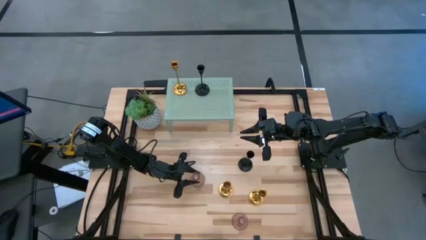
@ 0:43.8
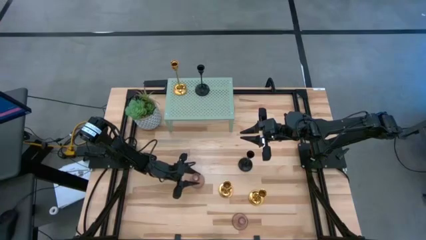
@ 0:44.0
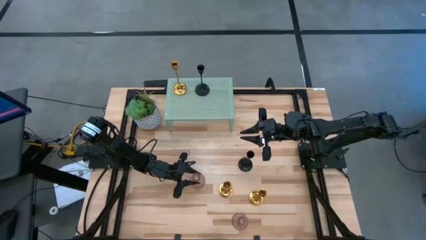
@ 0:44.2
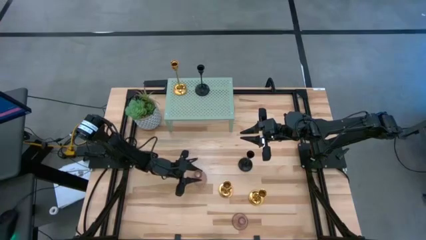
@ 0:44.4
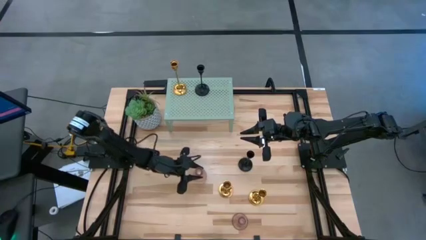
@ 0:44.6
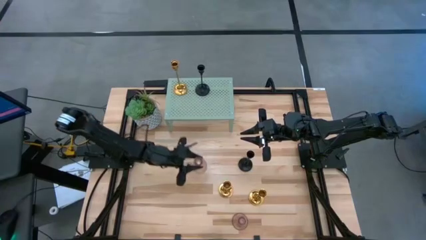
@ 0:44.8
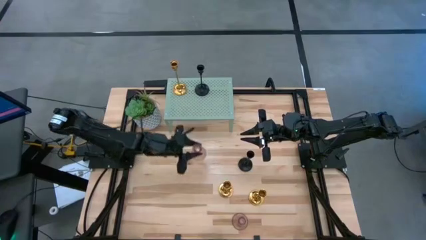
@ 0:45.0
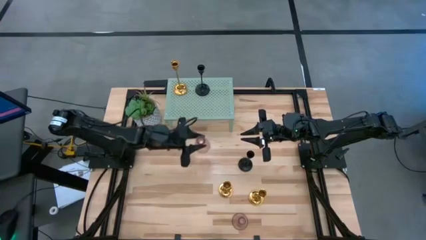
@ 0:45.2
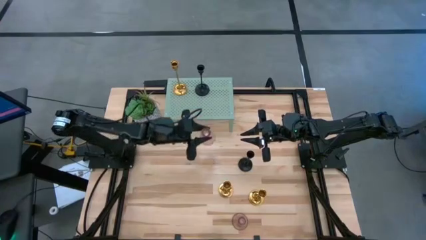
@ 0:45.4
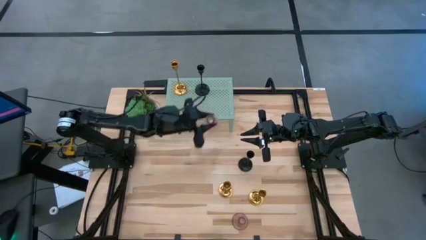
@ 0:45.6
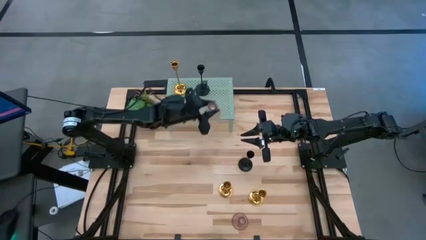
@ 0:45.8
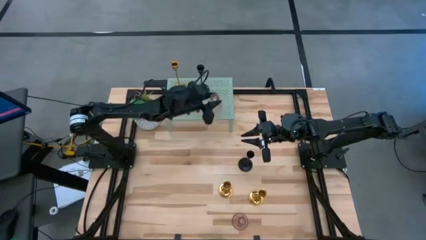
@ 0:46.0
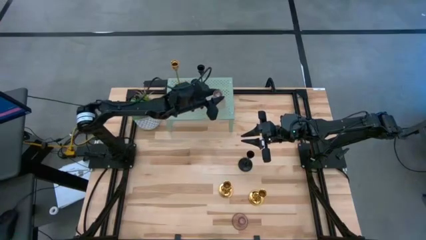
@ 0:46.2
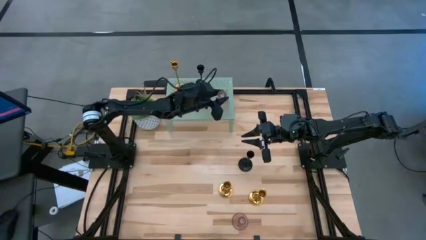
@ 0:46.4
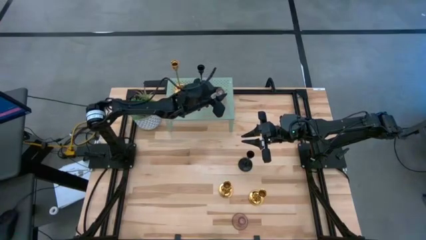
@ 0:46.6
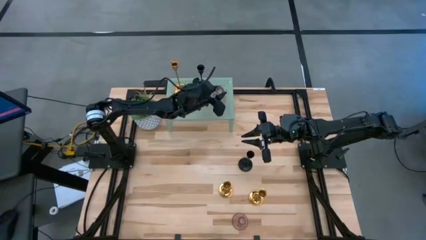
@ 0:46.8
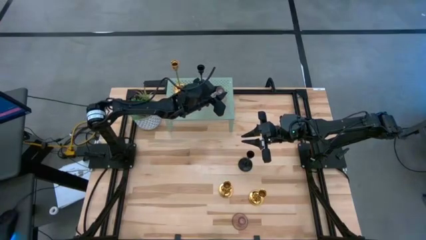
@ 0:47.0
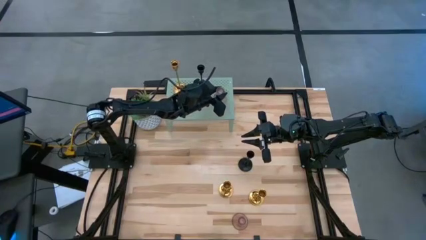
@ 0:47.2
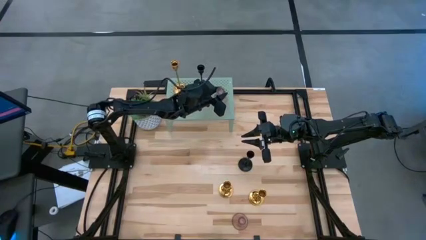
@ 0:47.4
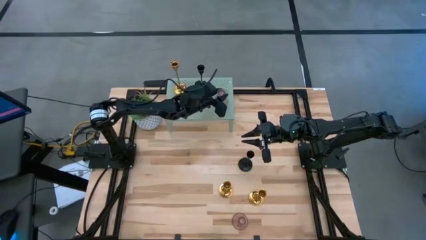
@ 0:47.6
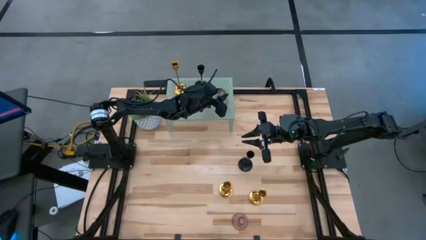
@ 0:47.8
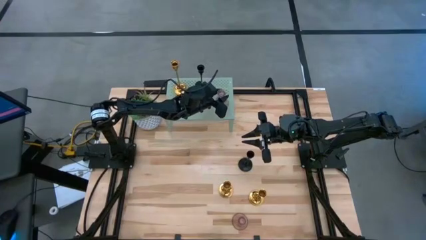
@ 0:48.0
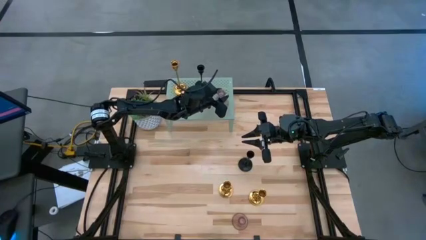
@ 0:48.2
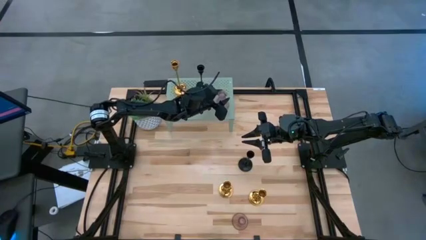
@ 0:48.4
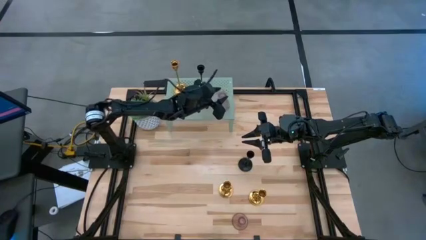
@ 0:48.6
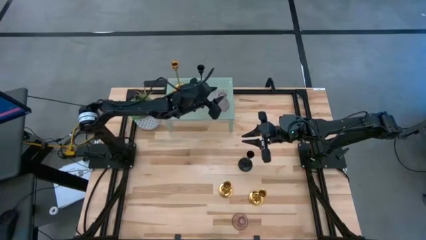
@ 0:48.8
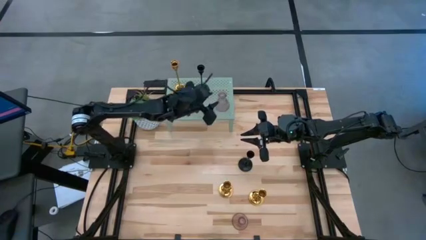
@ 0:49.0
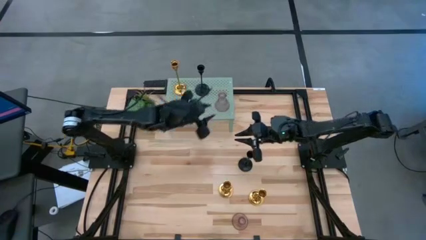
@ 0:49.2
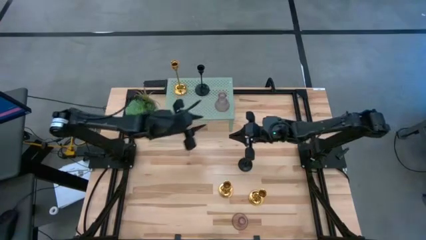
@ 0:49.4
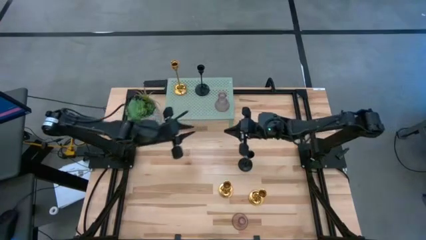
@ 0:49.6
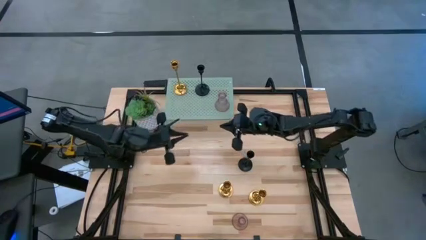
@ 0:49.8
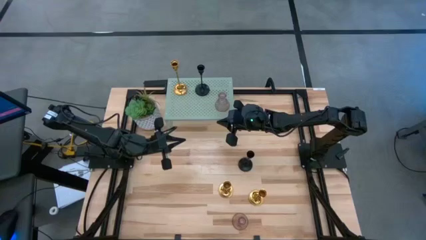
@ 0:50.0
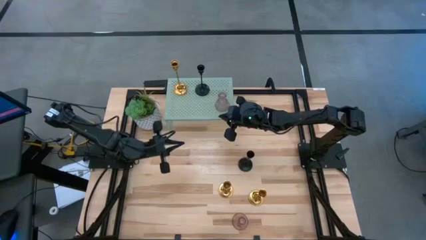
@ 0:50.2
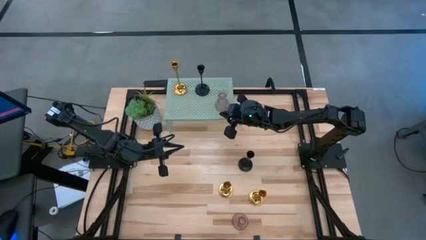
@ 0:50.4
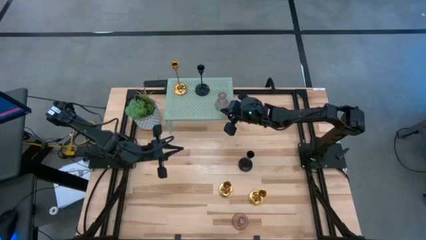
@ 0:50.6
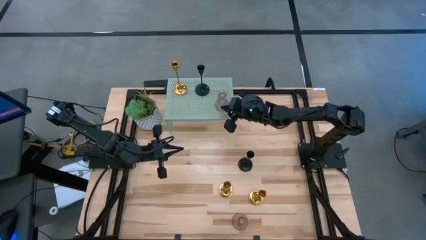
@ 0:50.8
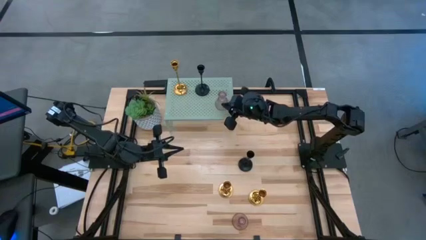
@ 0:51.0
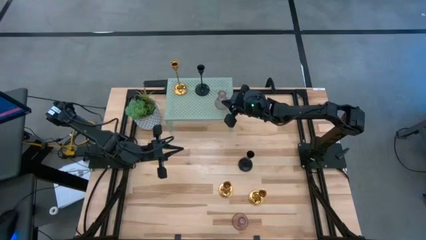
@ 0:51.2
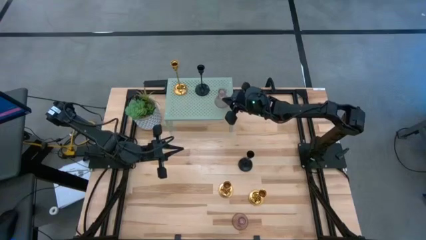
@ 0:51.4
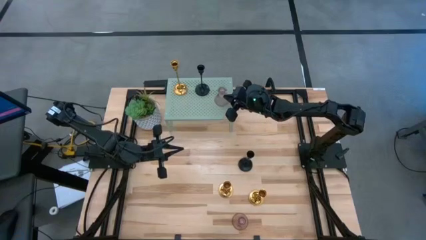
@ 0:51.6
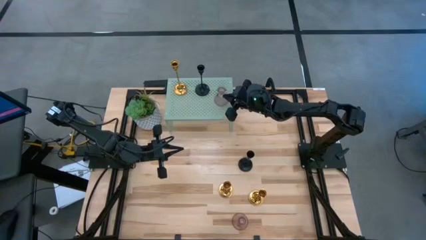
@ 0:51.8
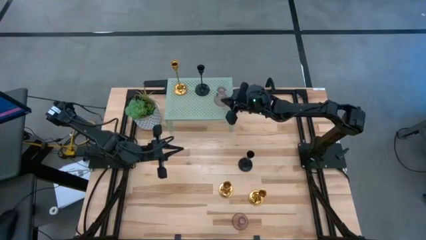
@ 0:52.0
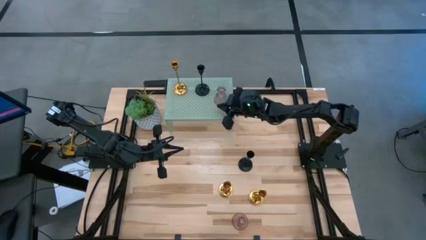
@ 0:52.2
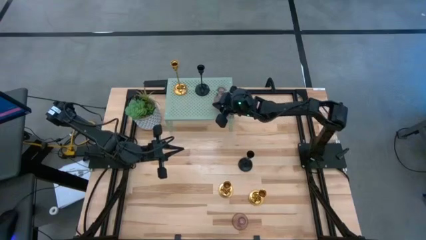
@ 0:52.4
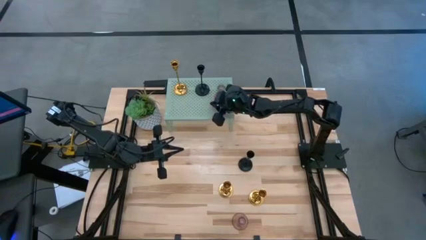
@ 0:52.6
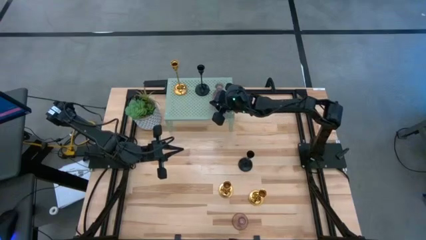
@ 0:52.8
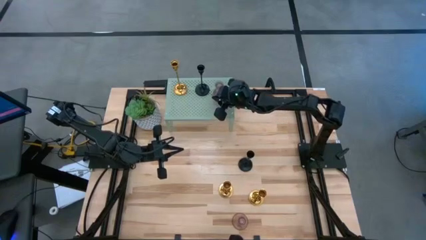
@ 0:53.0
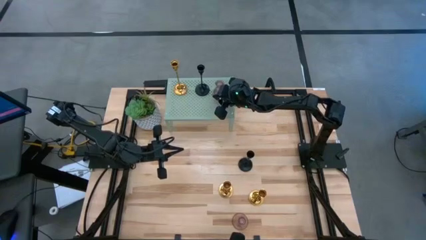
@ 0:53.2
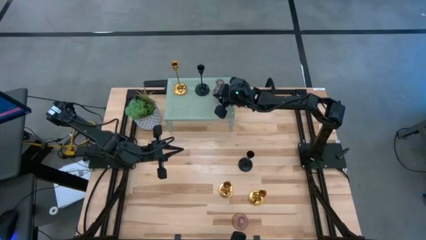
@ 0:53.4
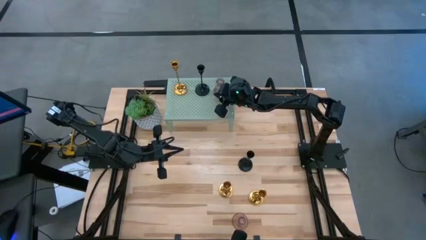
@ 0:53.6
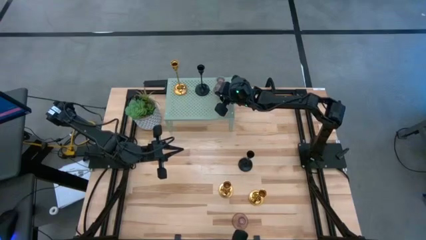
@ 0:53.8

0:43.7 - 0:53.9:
Task: Pick & Place candle stick holders
Put the middle pink glass candle holder on the shelf
